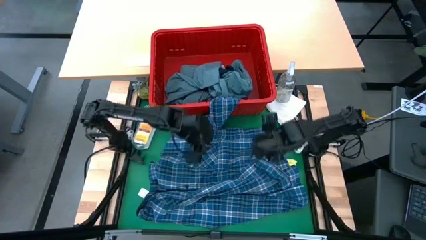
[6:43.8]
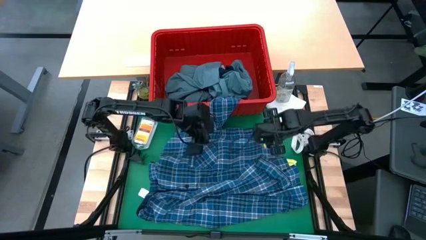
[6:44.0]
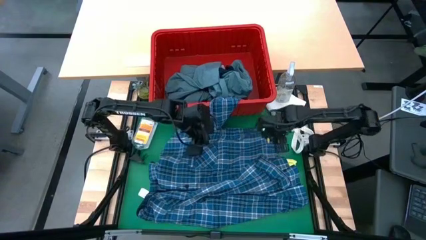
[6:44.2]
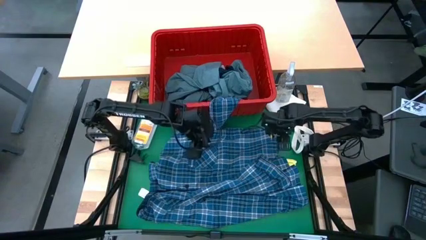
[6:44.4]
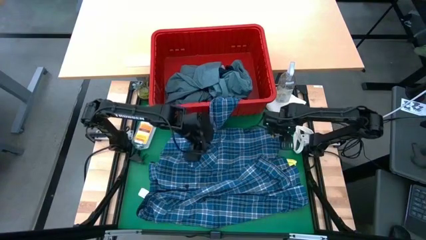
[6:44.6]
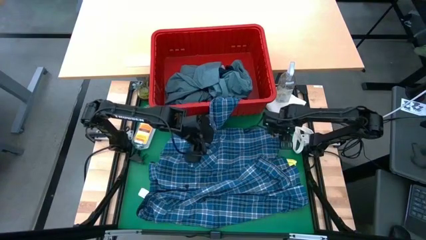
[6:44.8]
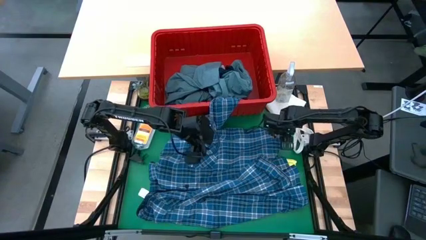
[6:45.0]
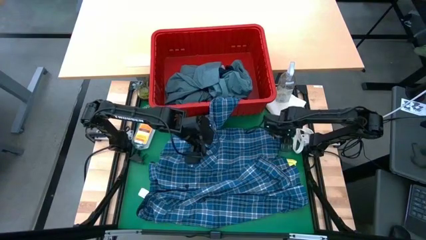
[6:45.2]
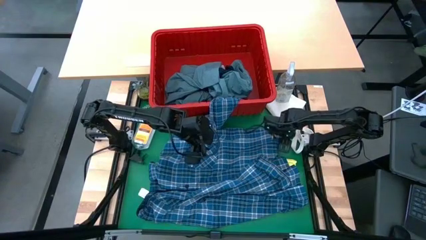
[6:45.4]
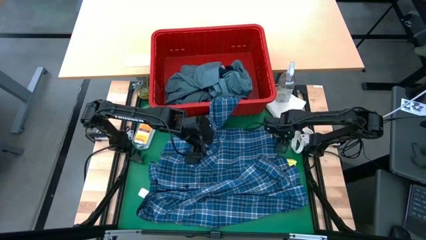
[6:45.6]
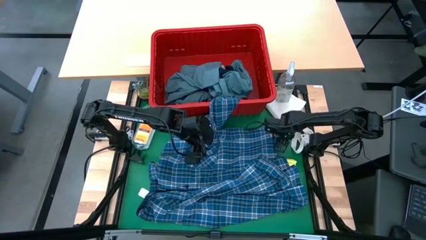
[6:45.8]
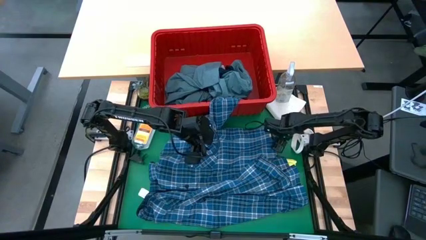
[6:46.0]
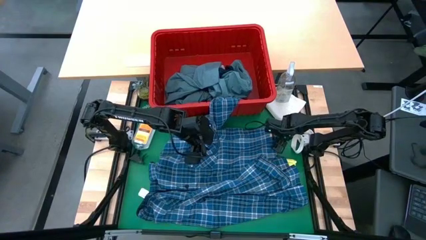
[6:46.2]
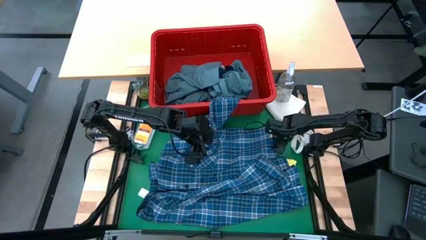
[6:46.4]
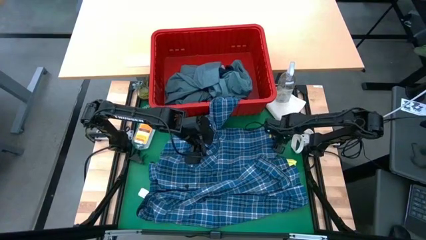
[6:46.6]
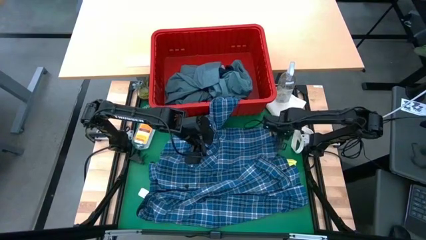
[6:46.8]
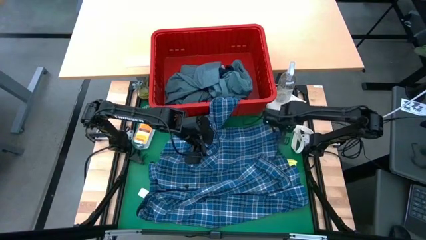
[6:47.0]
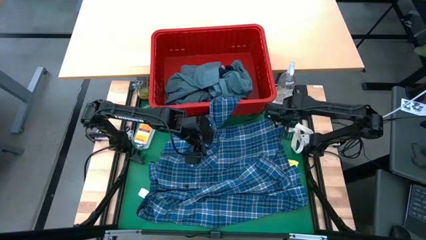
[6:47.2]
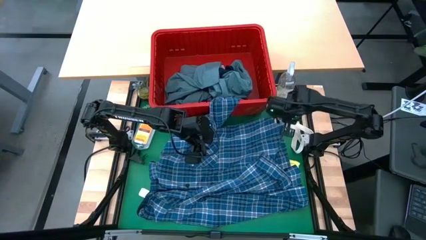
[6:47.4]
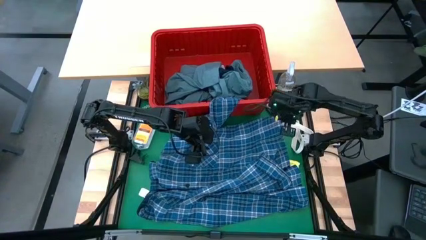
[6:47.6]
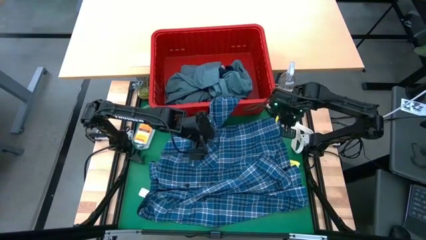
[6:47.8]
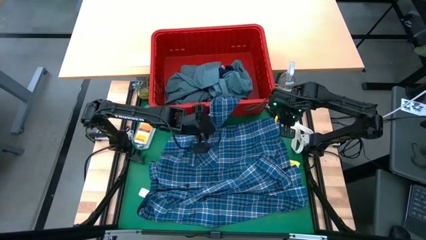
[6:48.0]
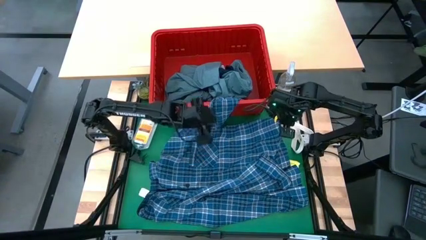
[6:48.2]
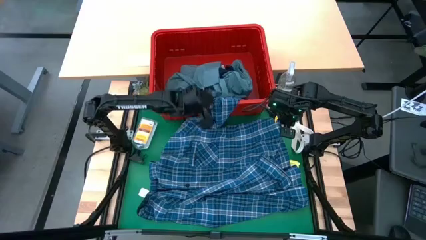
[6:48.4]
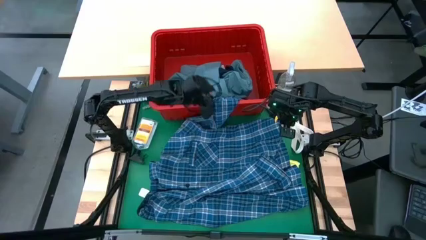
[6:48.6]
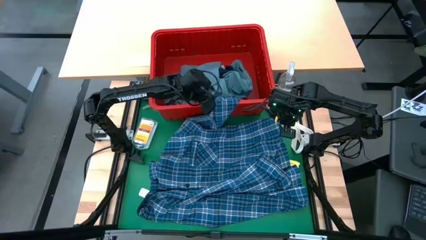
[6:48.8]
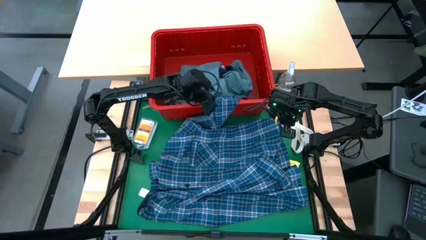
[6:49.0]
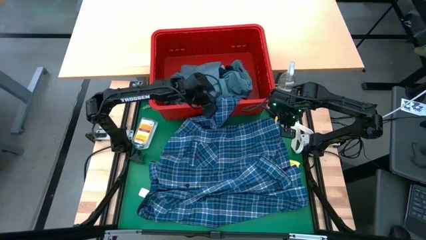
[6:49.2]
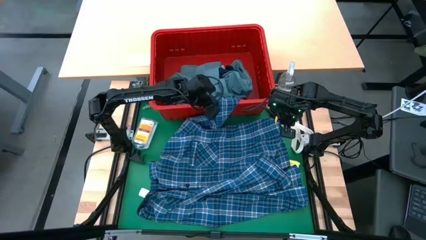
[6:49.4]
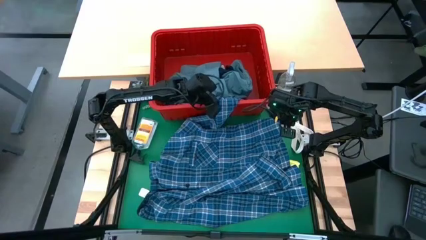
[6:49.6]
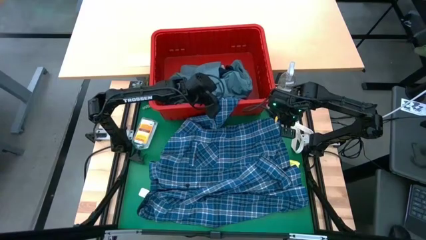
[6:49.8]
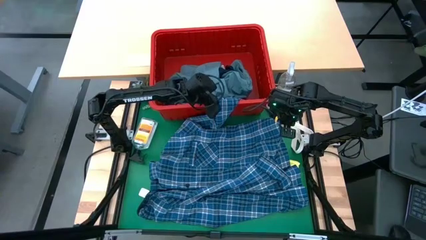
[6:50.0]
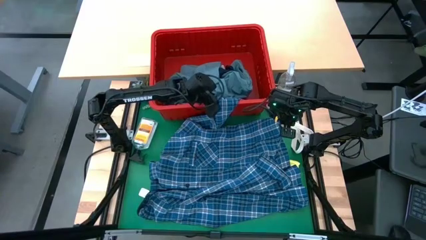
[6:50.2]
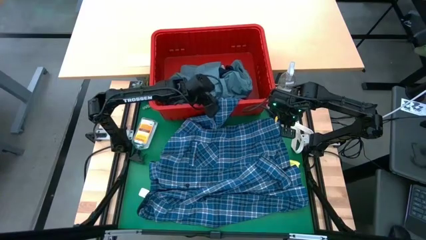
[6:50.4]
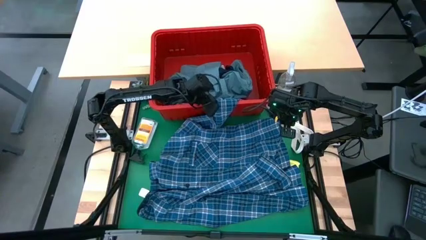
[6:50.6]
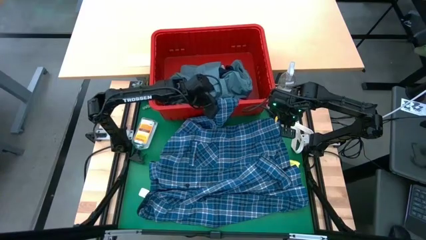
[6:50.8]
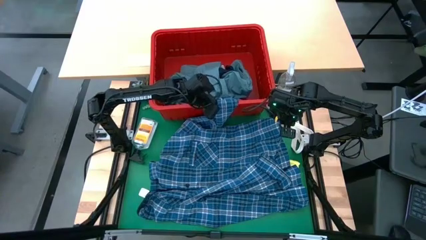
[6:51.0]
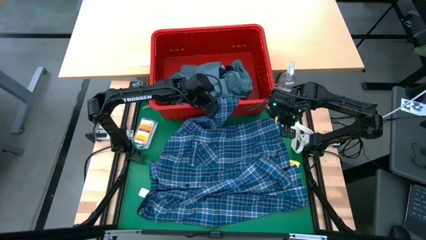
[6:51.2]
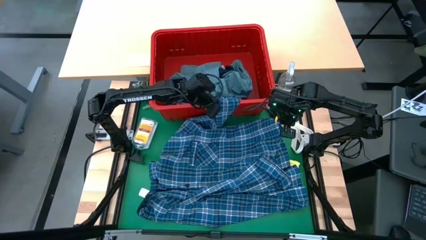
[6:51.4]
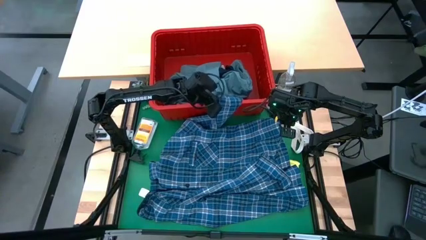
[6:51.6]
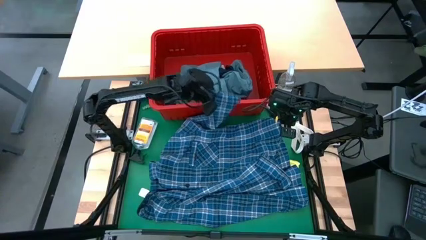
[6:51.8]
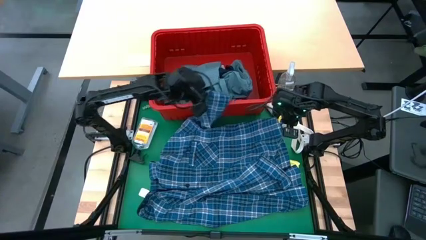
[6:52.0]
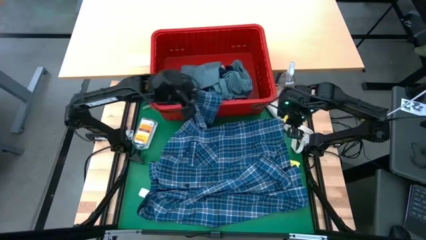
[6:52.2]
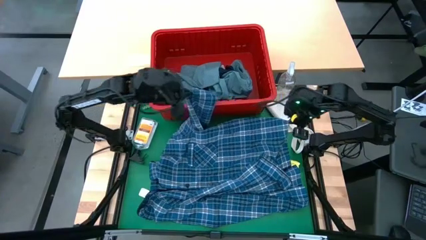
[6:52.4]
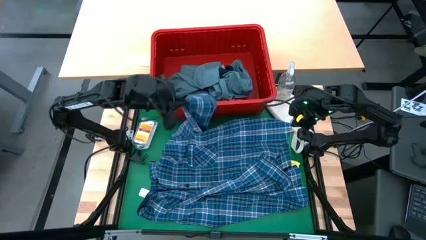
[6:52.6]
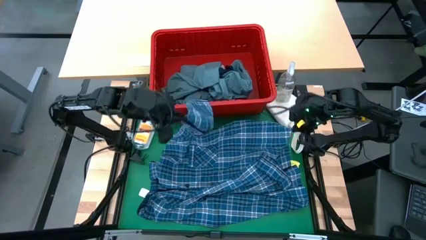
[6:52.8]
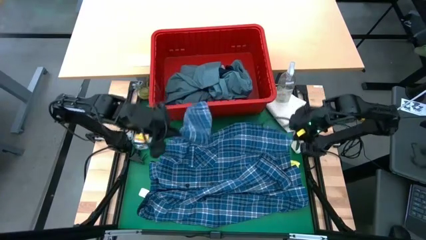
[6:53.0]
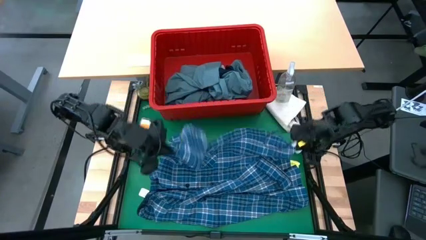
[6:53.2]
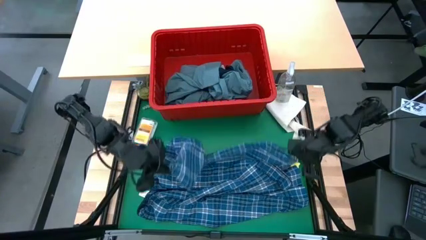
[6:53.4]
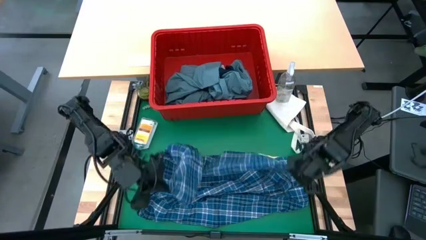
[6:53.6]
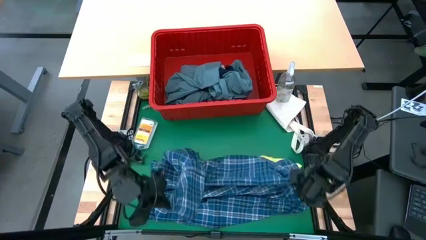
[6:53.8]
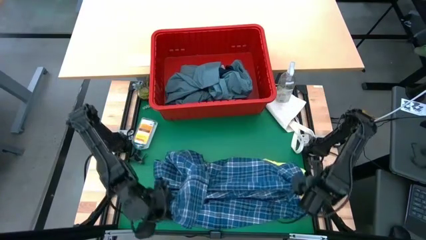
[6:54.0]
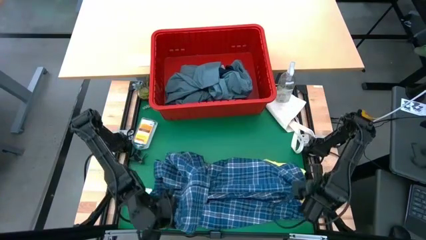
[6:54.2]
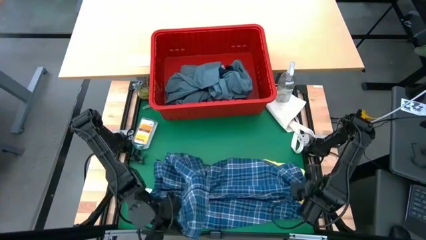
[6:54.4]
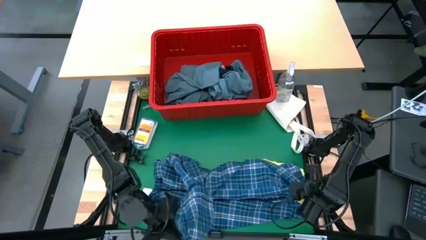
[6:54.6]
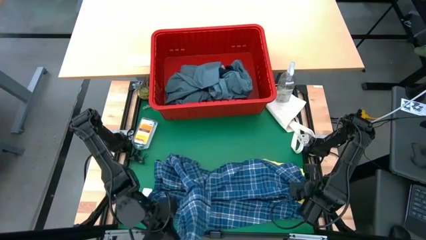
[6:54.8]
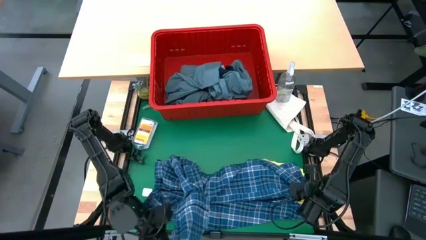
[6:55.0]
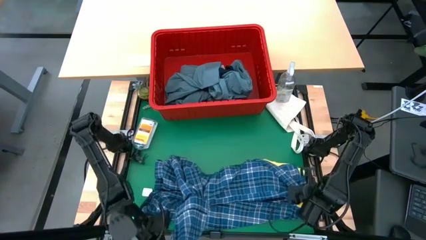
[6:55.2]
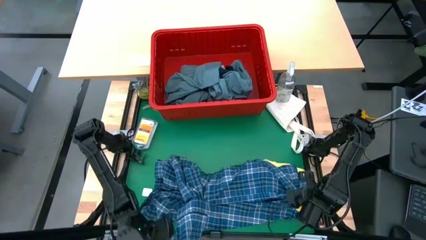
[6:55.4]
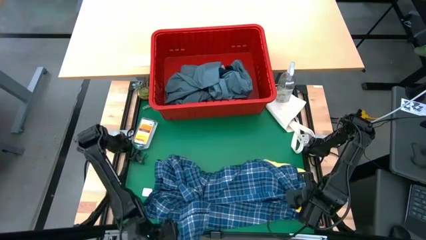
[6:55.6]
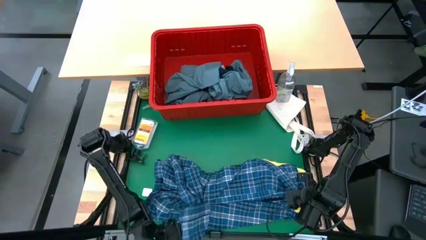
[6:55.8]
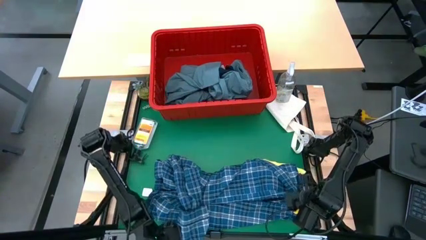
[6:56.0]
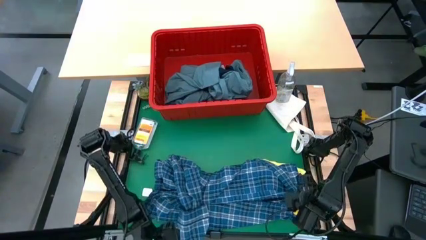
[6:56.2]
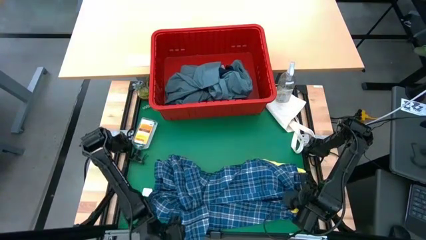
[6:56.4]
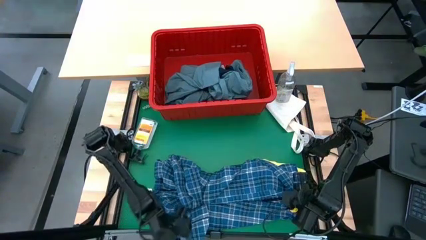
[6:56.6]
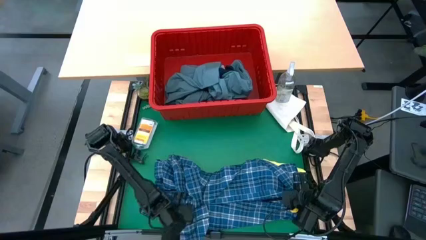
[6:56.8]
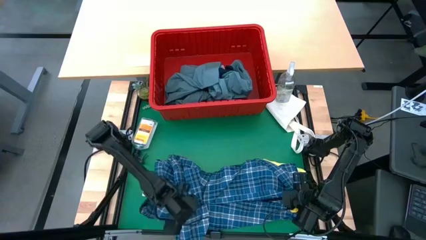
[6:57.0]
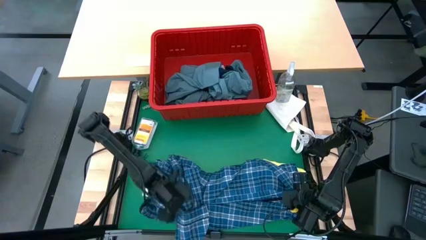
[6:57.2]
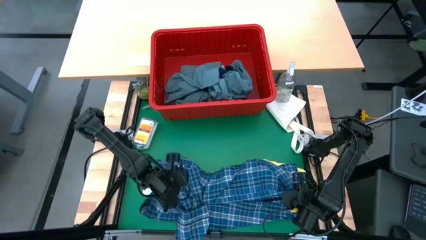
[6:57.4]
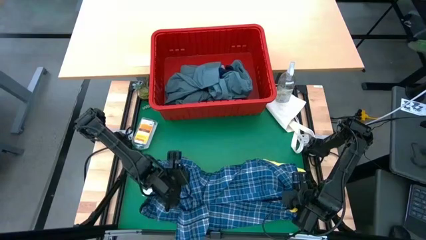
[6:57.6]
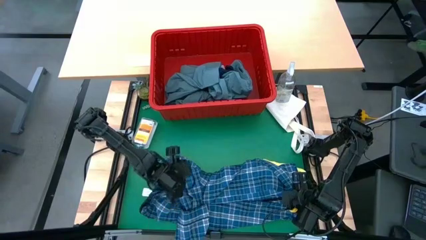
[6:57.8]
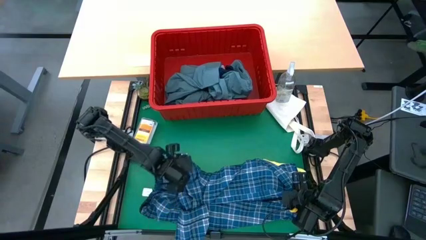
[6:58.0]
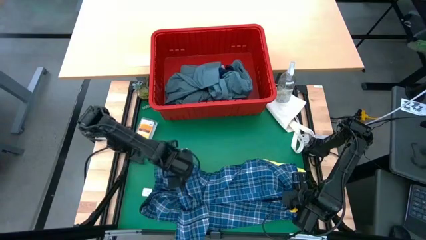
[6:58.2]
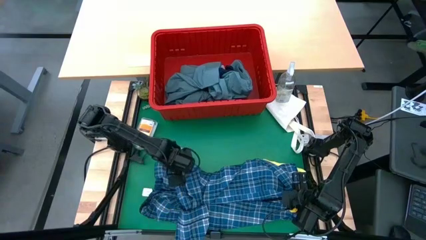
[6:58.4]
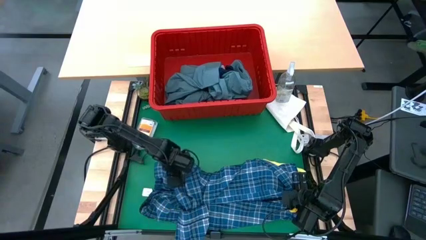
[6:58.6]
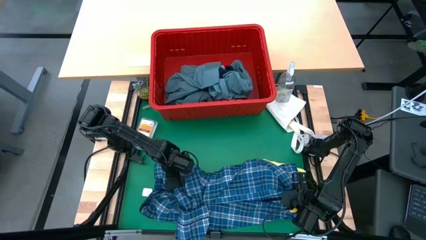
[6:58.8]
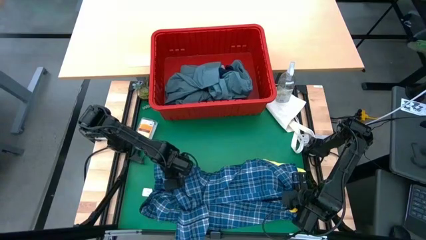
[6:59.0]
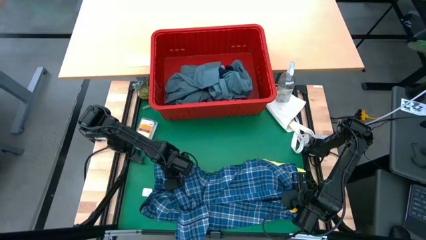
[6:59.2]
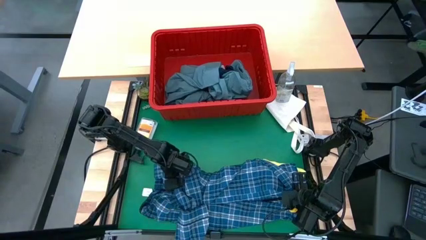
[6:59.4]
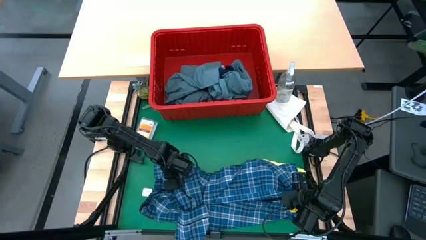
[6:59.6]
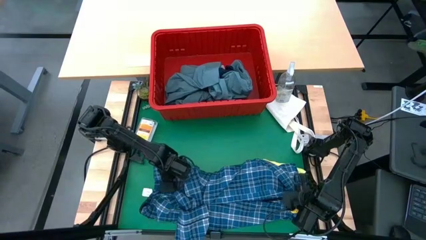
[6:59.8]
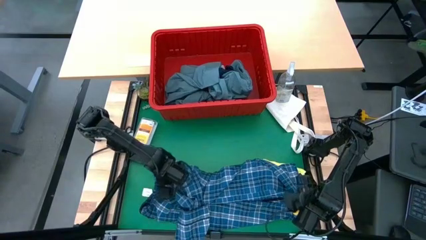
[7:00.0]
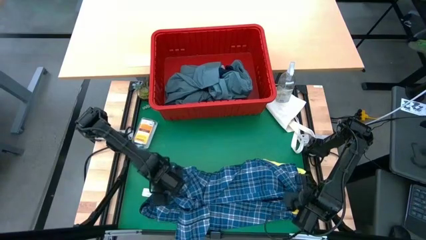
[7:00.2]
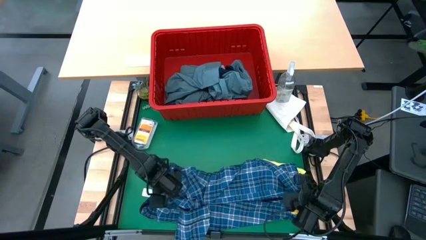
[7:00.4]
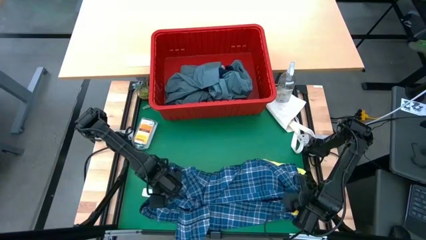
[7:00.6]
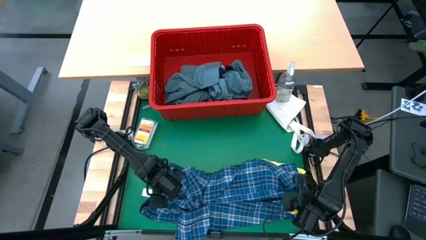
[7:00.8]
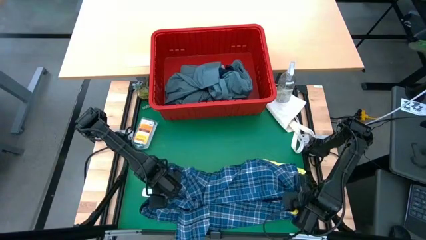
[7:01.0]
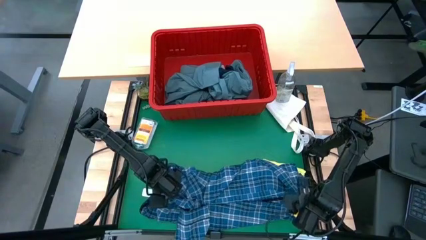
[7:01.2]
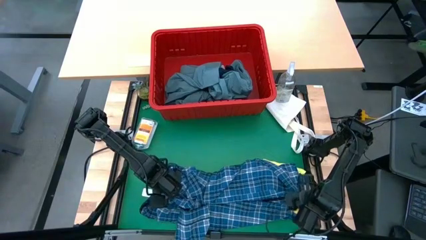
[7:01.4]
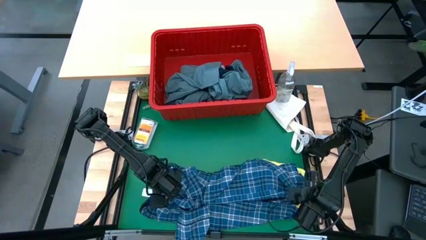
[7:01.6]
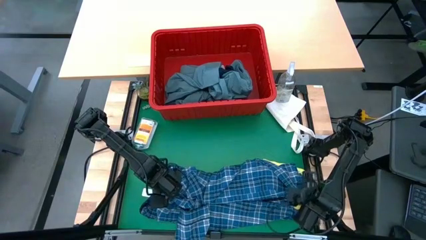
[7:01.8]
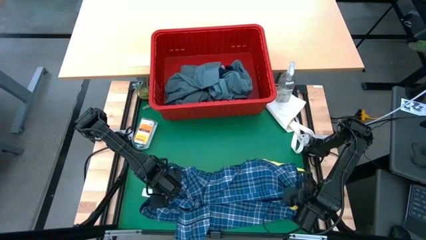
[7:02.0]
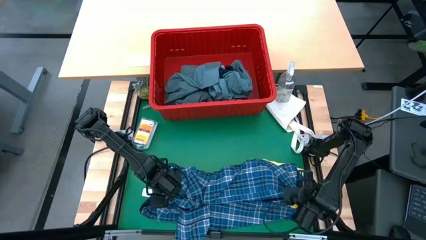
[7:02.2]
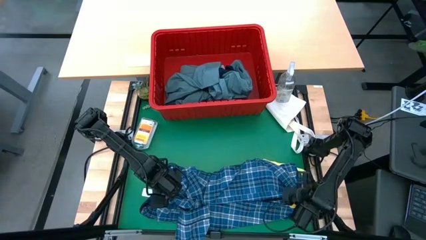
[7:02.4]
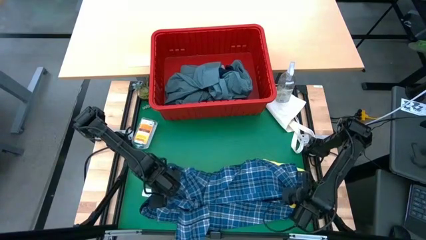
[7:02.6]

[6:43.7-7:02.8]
Task: Fold Laundry from Bin
Fold the blue shirt
